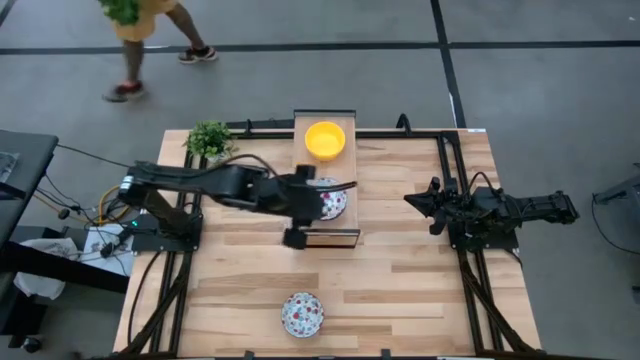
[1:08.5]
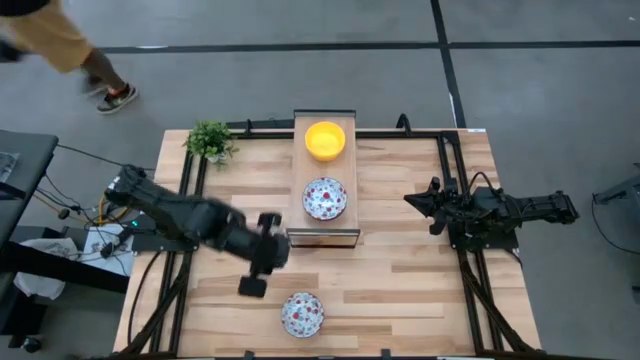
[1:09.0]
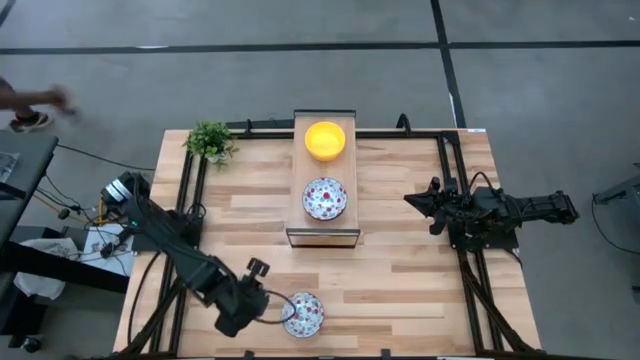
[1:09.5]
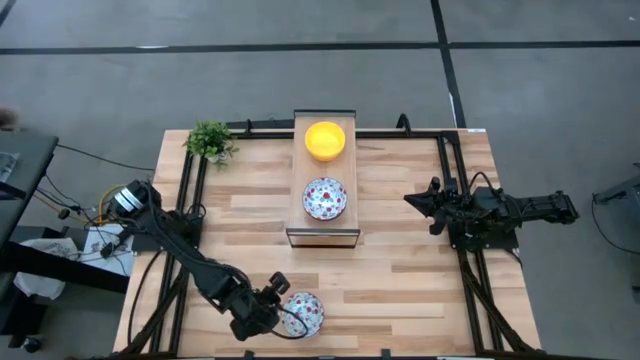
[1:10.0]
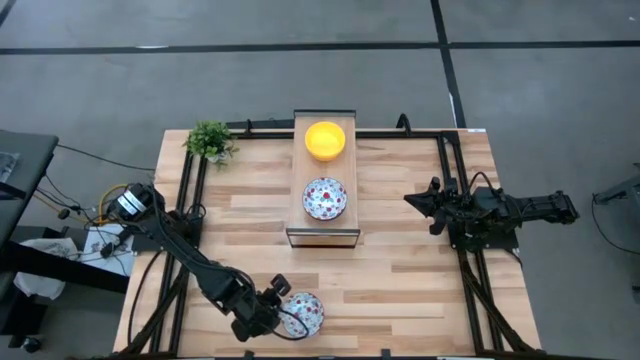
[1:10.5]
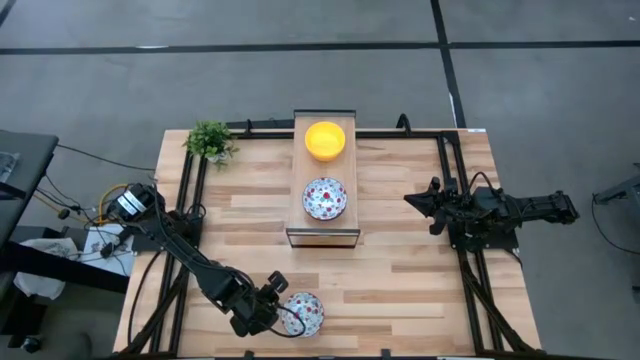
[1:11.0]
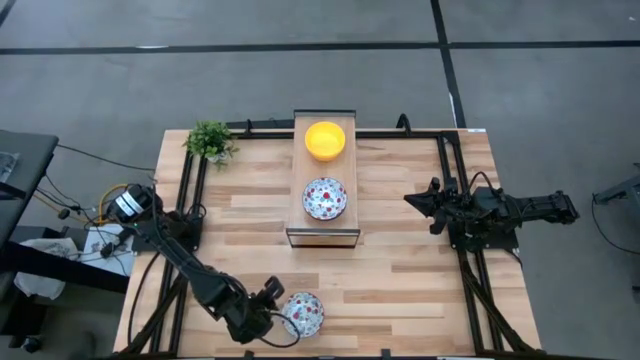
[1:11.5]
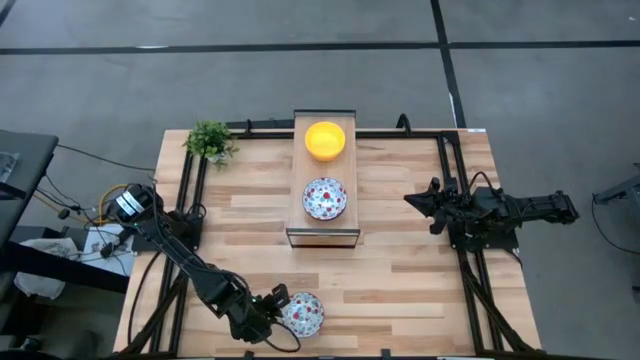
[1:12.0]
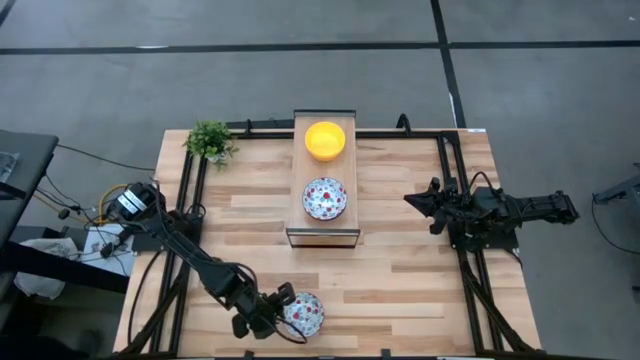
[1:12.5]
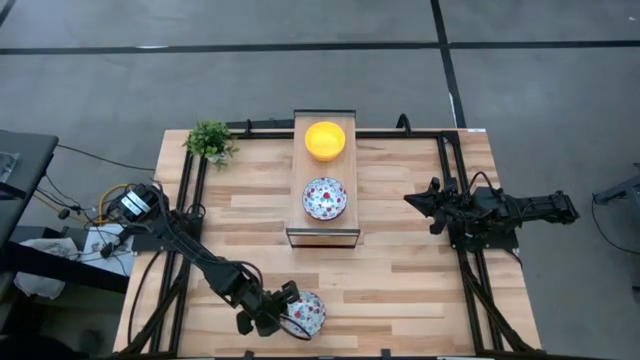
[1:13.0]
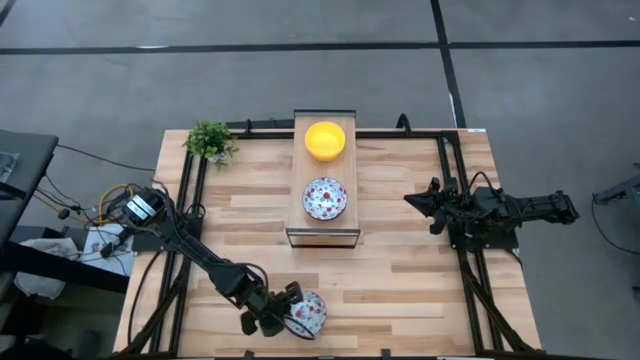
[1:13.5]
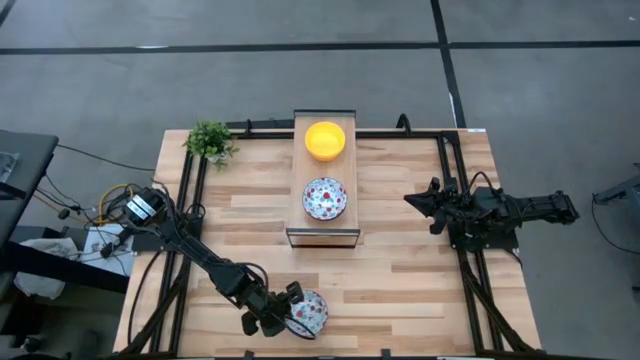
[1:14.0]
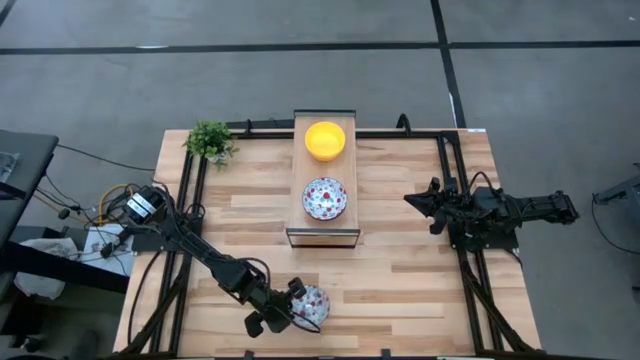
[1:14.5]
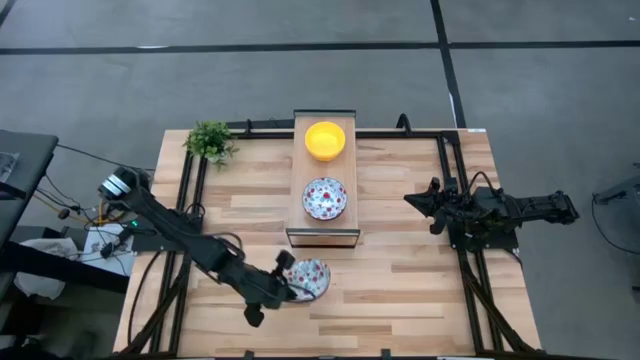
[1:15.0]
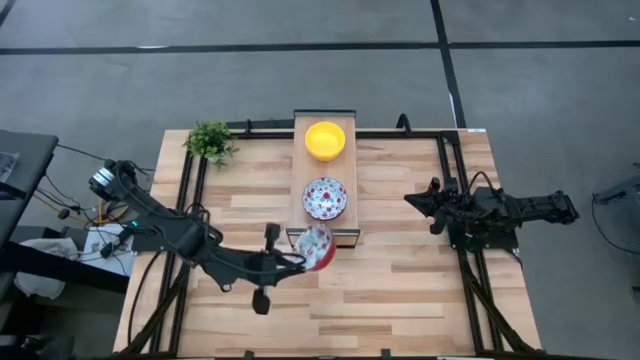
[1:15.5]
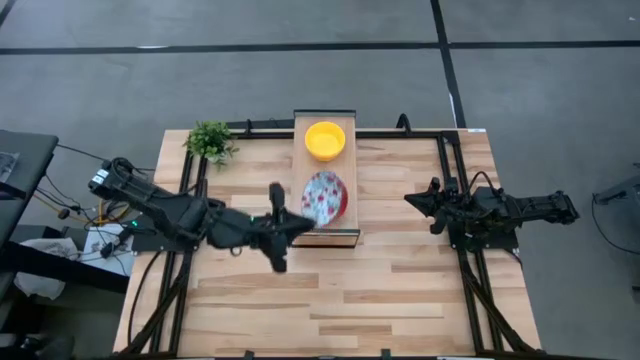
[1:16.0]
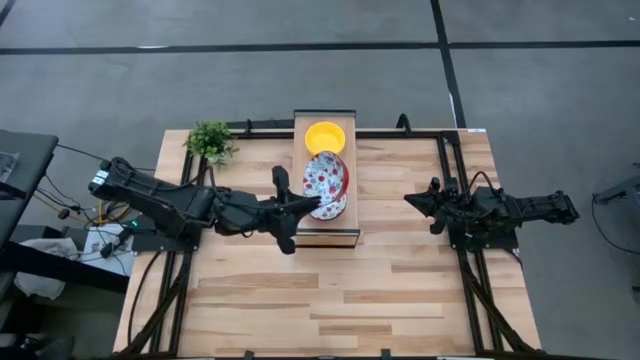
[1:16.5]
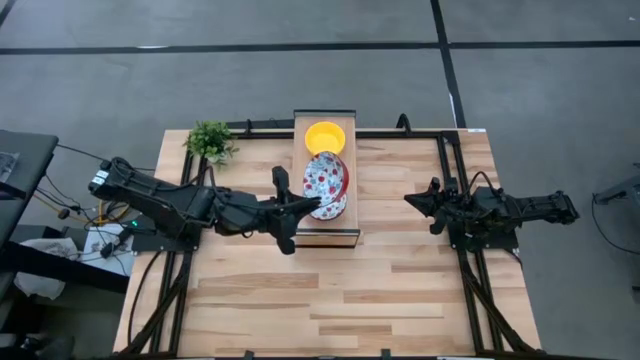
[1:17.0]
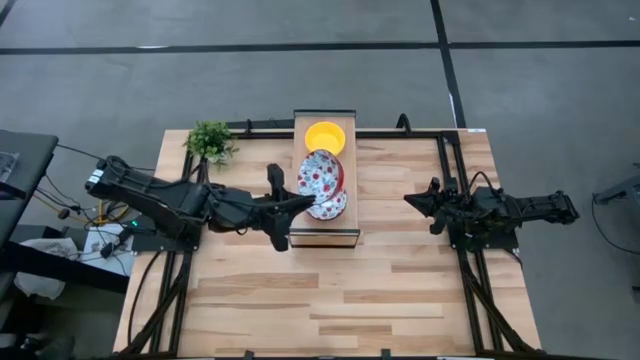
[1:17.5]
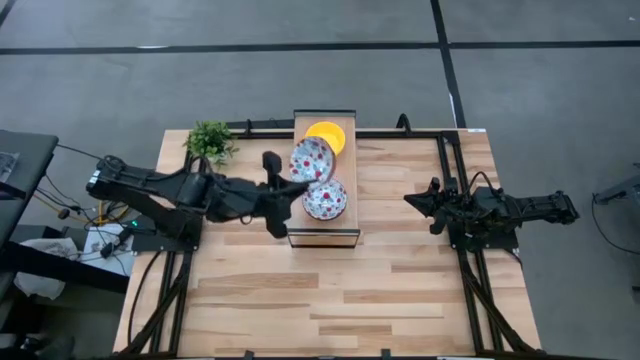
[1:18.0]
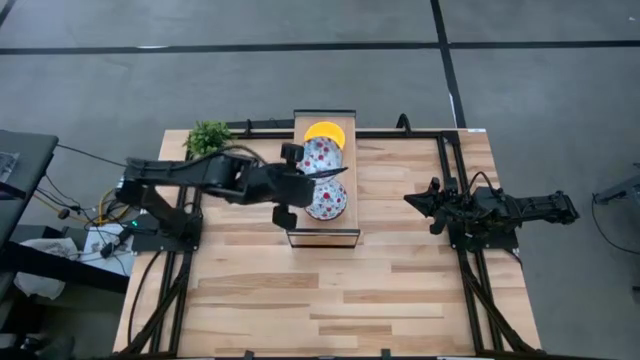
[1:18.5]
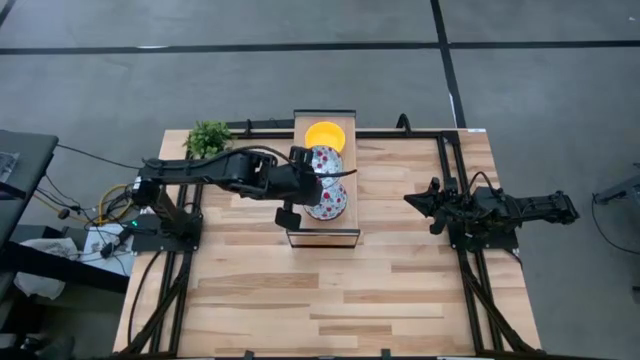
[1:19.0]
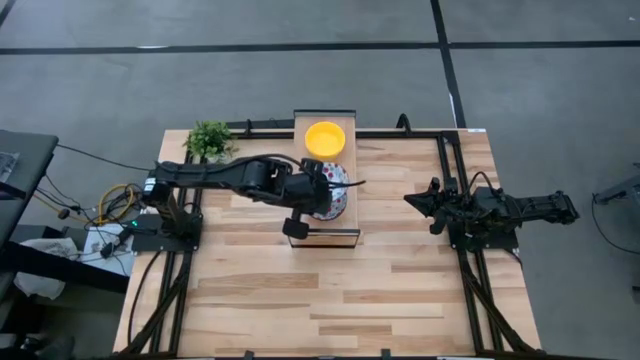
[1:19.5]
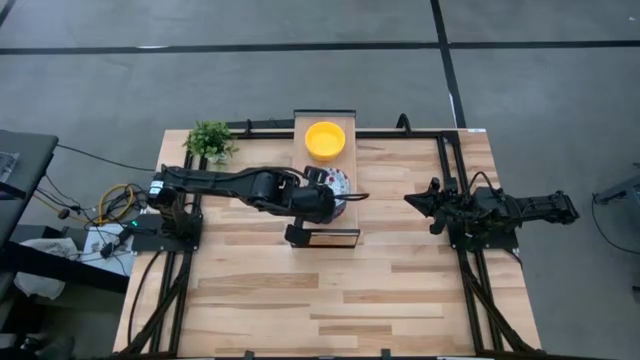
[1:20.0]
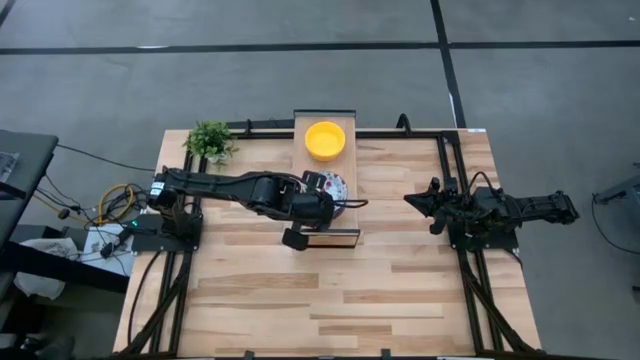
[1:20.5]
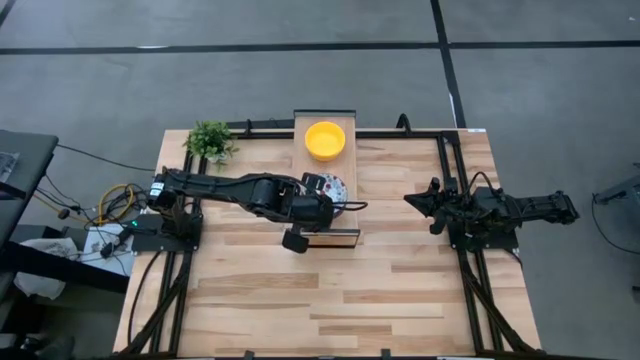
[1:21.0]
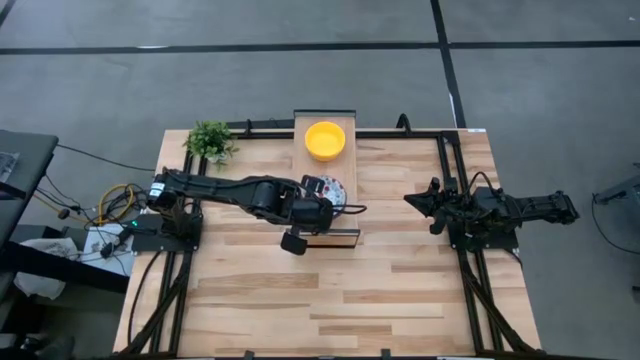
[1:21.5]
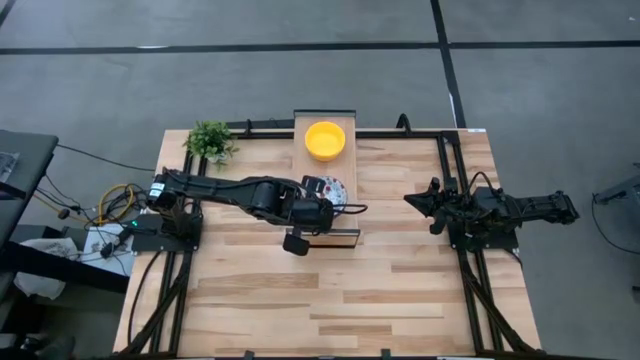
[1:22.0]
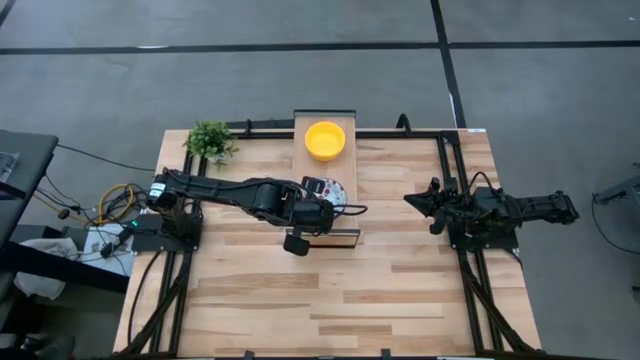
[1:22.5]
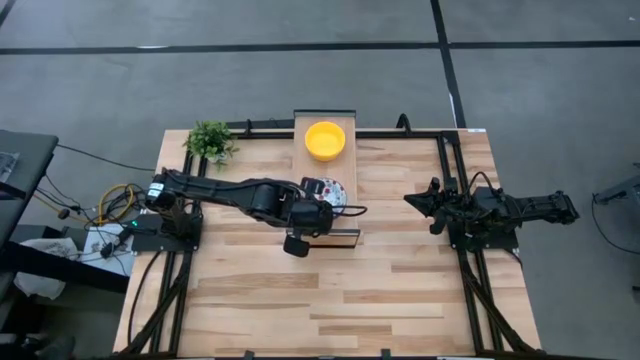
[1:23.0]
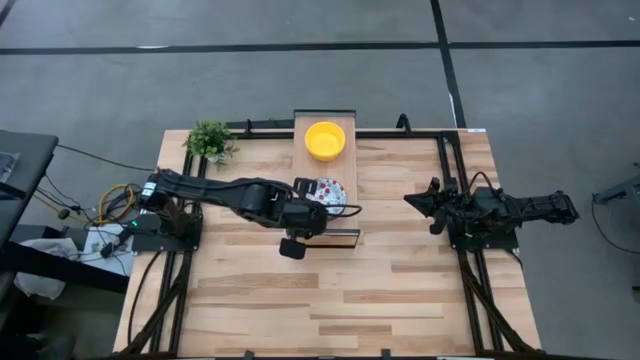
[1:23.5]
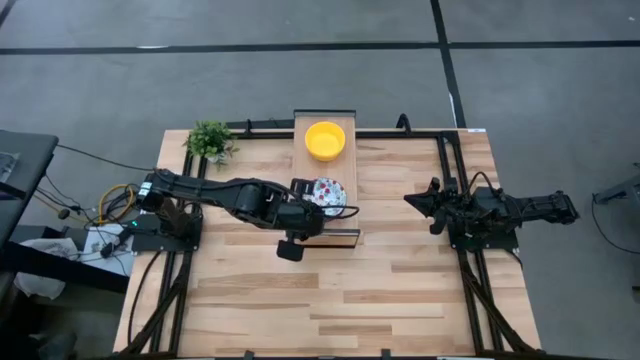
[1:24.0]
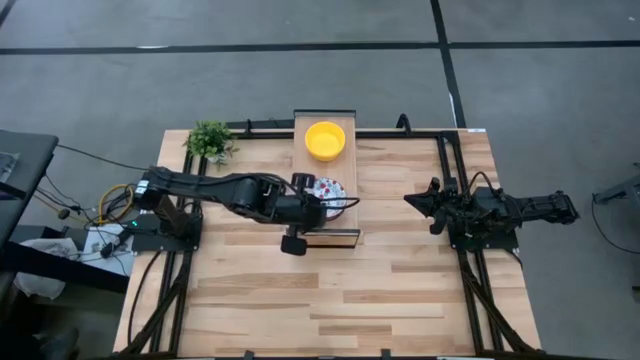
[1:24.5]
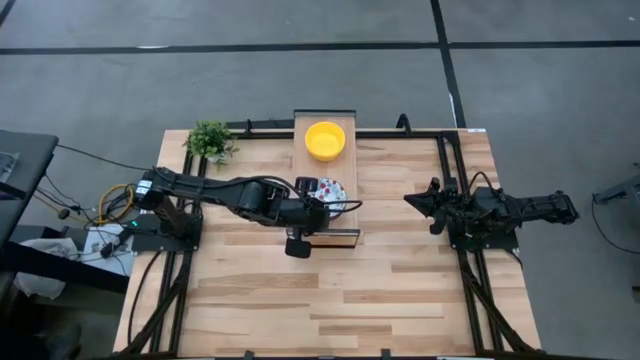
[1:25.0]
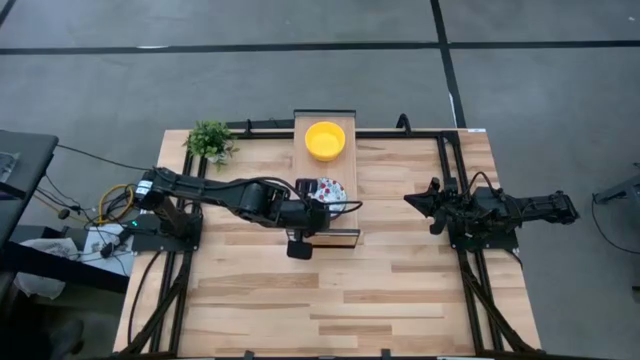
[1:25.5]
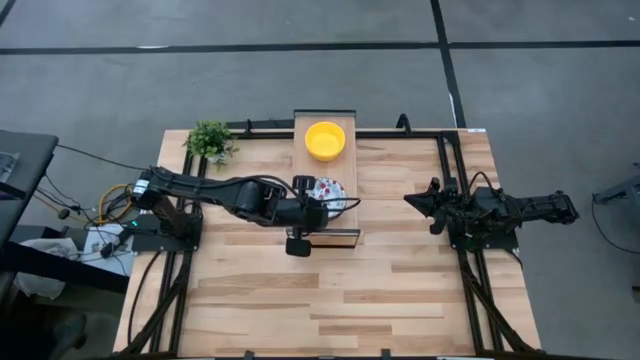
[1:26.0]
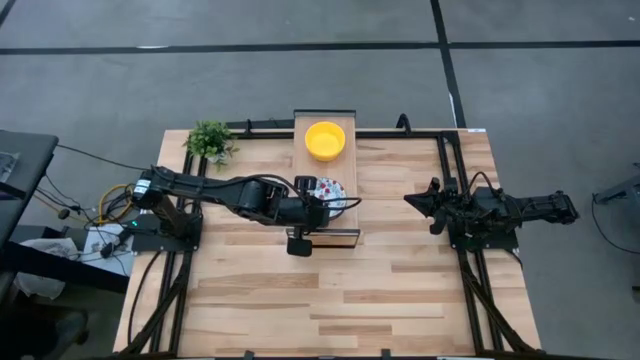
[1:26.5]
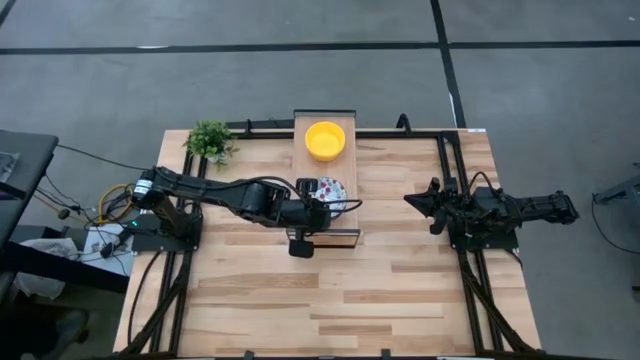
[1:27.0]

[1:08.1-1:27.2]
Task: Pick & Place Mini bowls
Stack the white patterned bowl on top of the white patterned bowl on the shelf

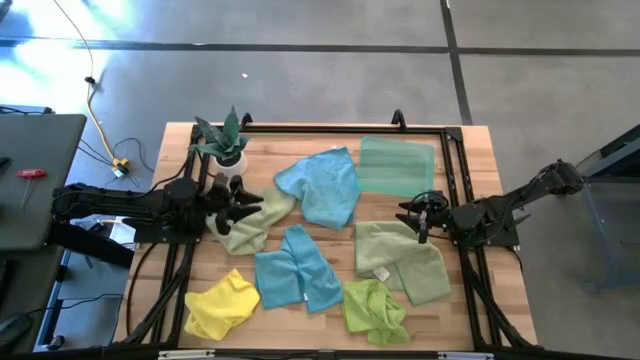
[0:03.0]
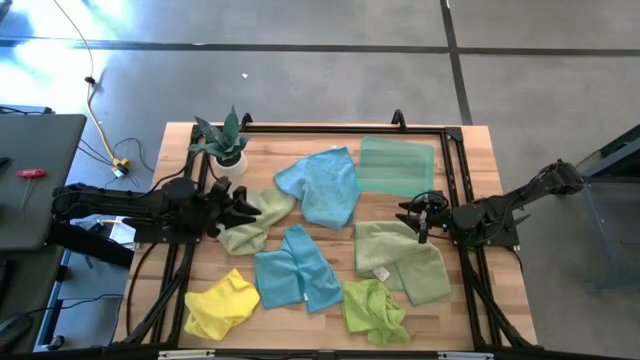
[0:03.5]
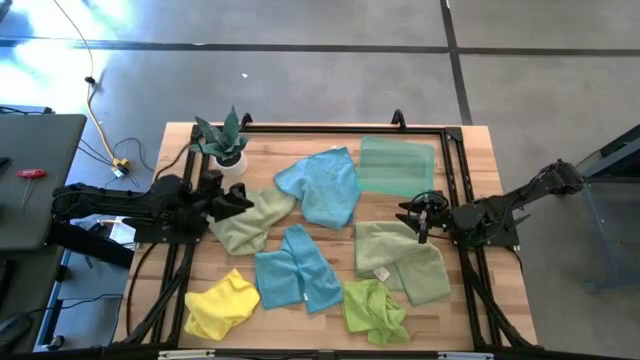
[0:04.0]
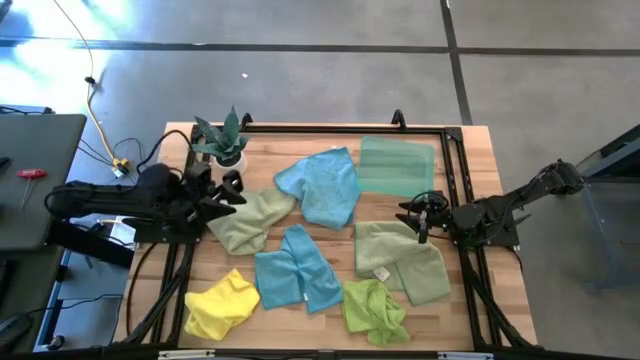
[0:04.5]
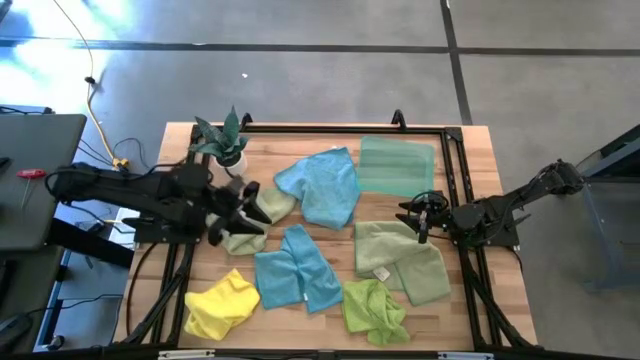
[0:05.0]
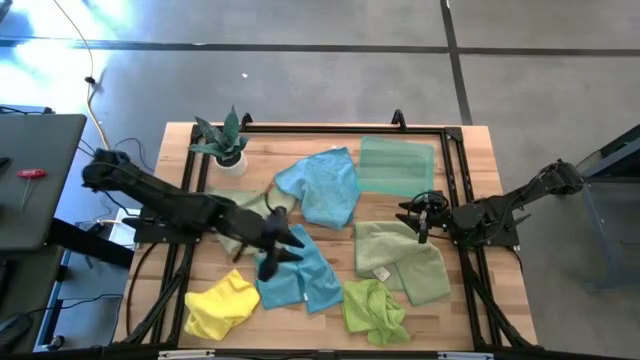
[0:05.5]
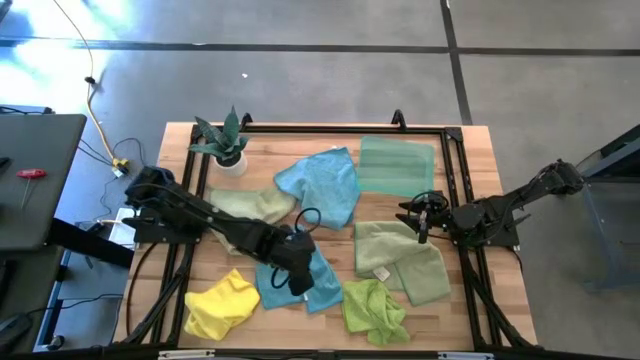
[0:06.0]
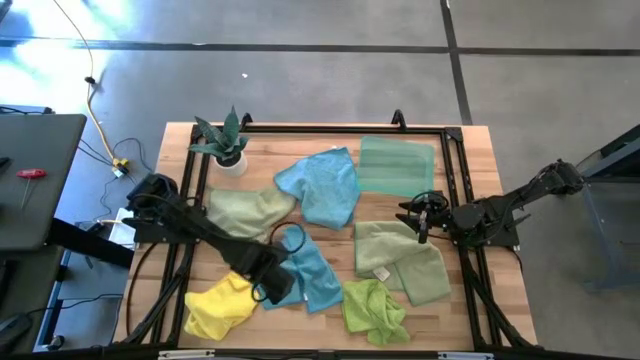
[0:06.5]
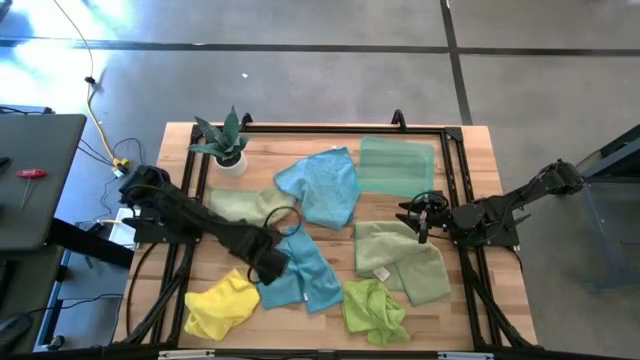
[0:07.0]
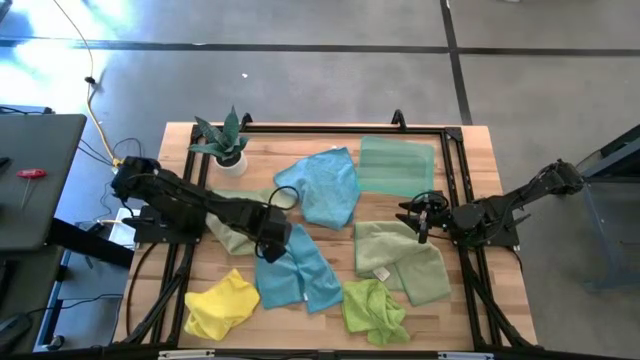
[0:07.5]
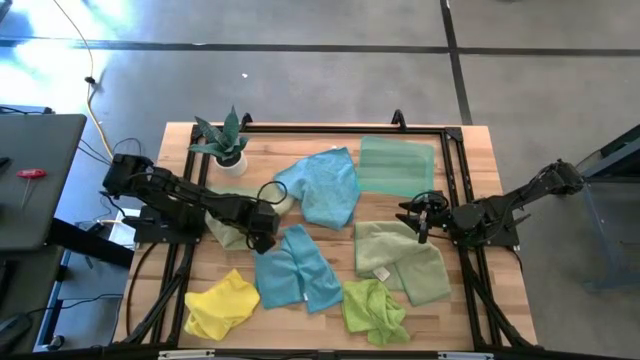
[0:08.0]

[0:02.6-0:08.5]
Task: Fold microfiber towels
Adjust the left green microfiber cloth
